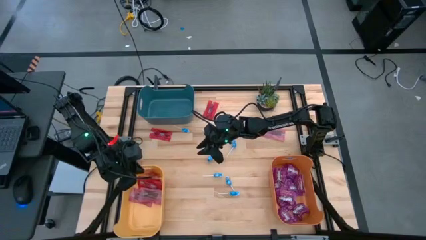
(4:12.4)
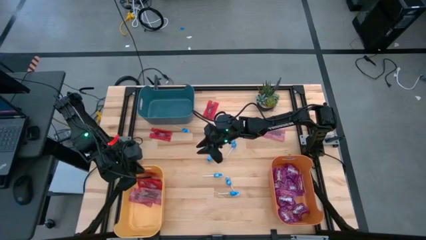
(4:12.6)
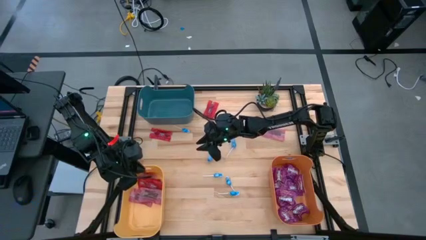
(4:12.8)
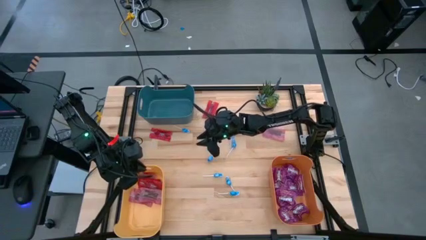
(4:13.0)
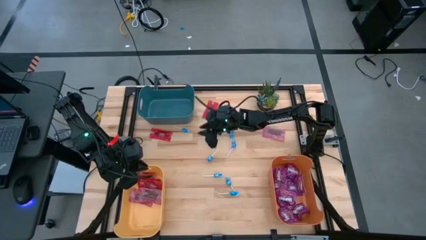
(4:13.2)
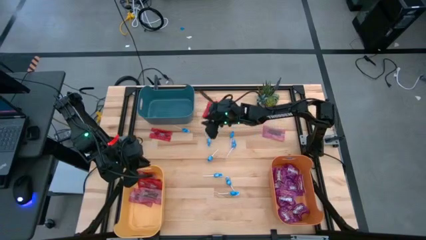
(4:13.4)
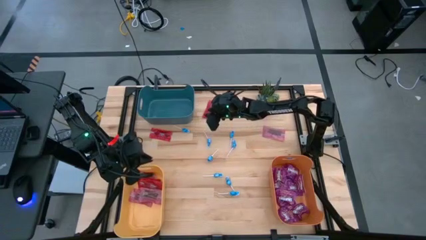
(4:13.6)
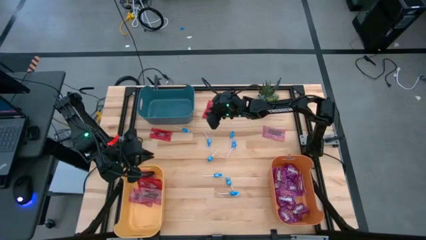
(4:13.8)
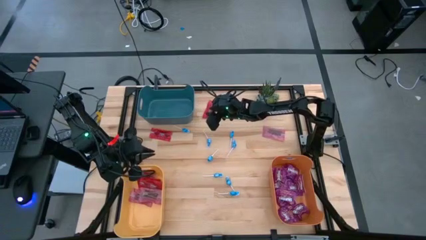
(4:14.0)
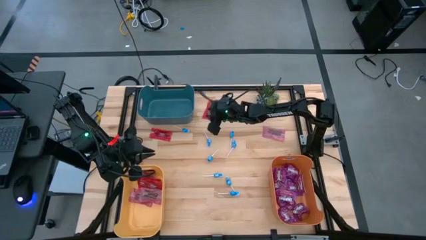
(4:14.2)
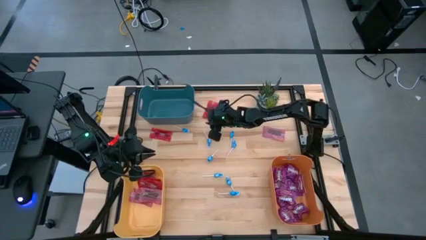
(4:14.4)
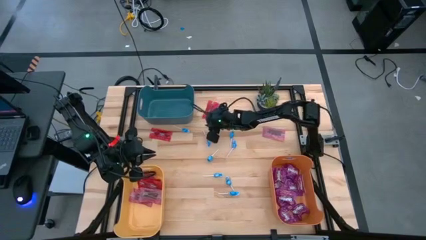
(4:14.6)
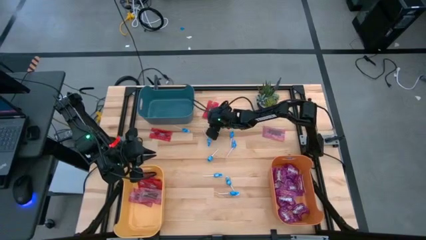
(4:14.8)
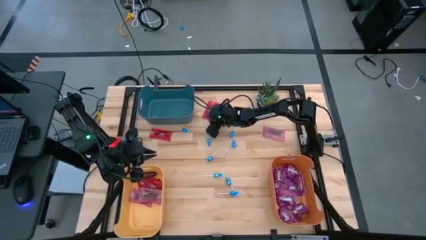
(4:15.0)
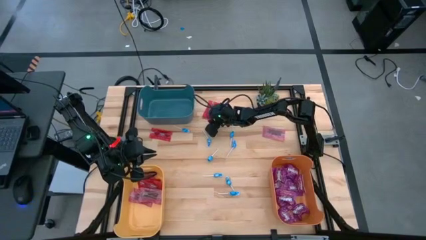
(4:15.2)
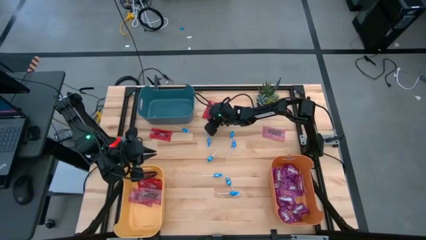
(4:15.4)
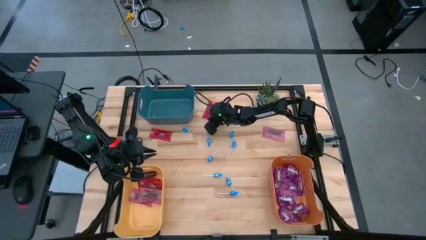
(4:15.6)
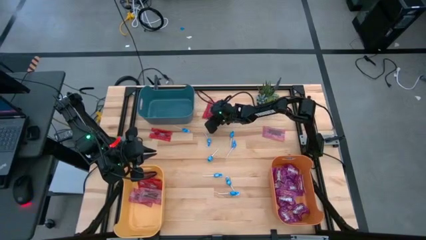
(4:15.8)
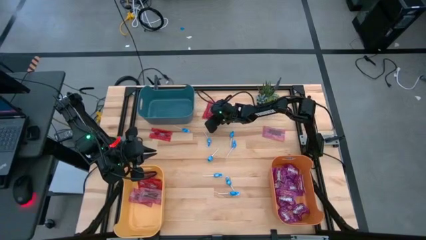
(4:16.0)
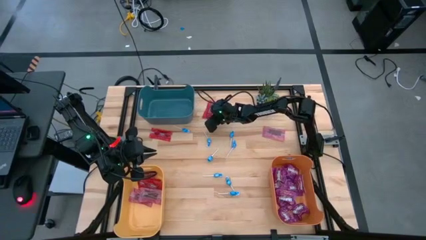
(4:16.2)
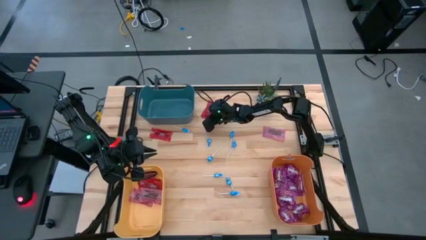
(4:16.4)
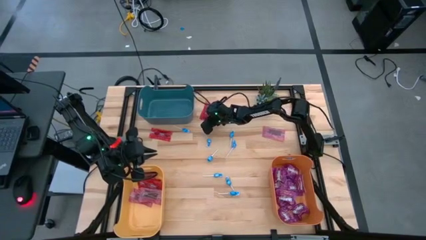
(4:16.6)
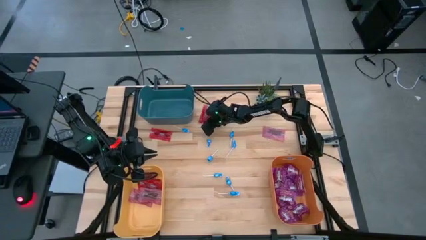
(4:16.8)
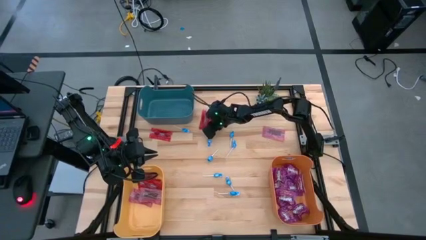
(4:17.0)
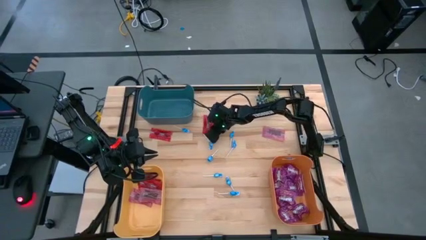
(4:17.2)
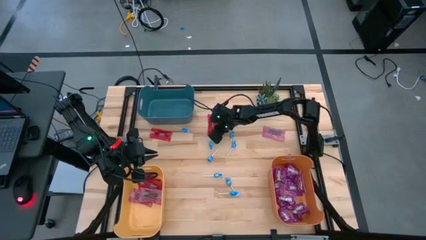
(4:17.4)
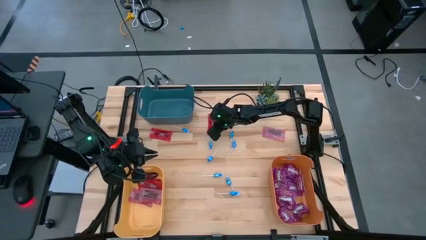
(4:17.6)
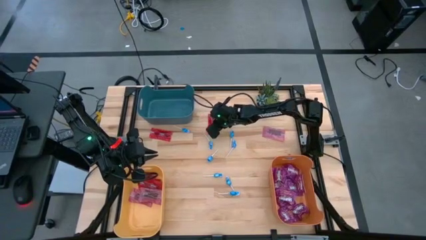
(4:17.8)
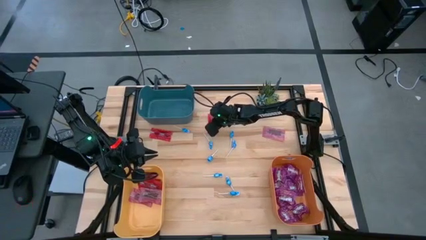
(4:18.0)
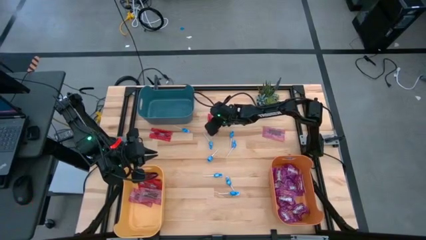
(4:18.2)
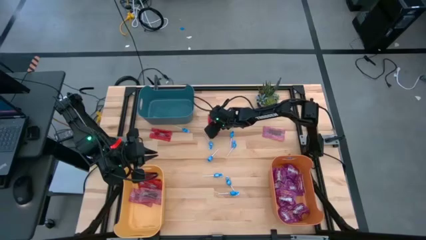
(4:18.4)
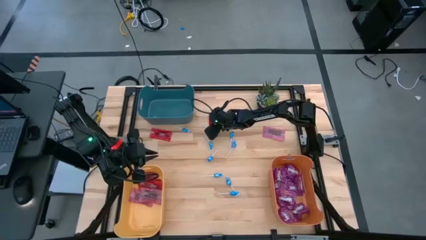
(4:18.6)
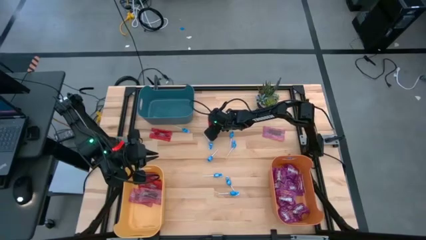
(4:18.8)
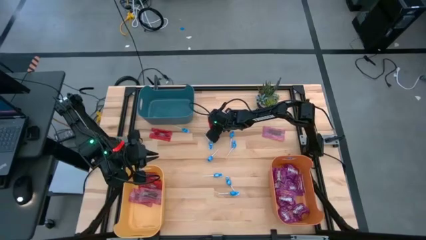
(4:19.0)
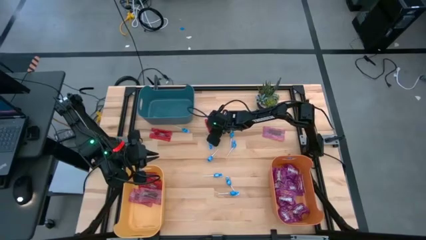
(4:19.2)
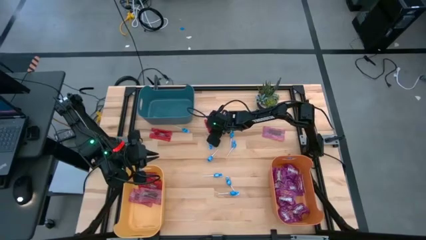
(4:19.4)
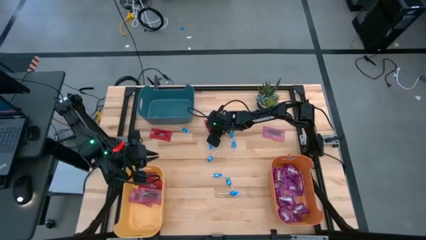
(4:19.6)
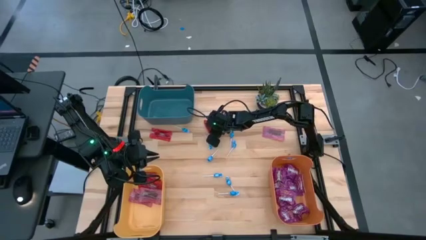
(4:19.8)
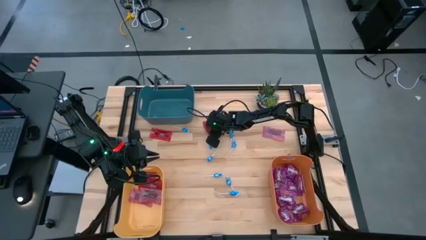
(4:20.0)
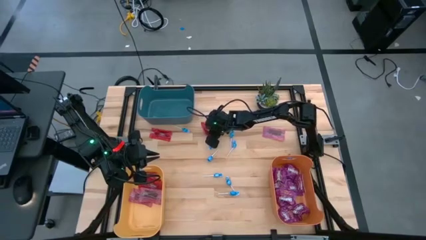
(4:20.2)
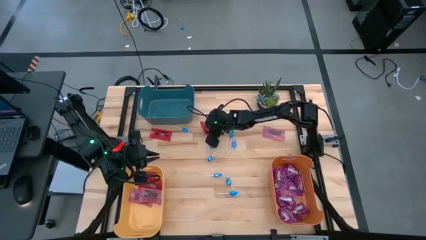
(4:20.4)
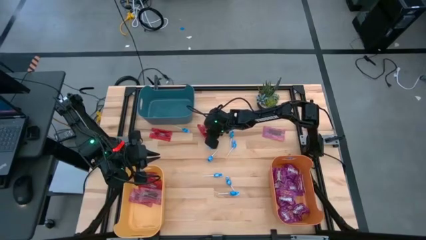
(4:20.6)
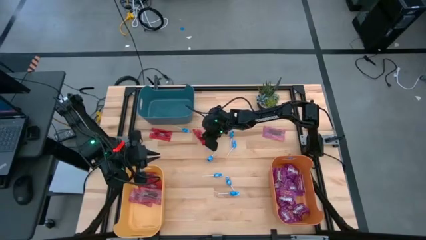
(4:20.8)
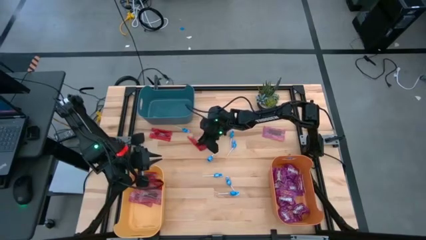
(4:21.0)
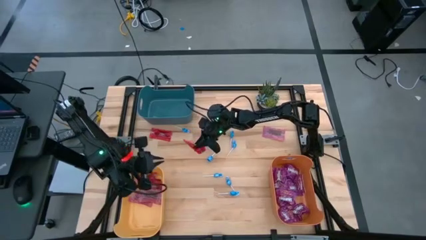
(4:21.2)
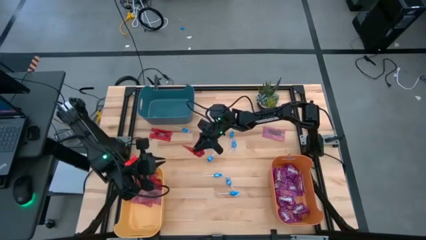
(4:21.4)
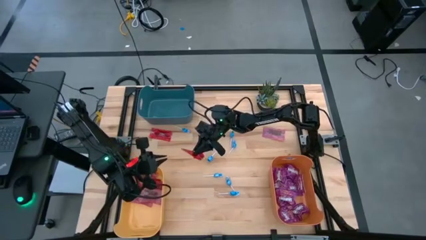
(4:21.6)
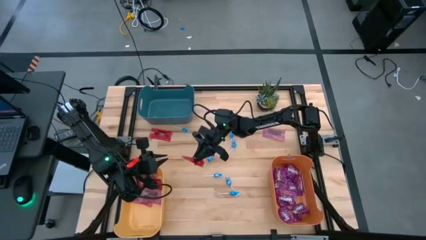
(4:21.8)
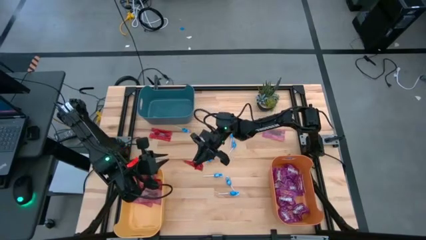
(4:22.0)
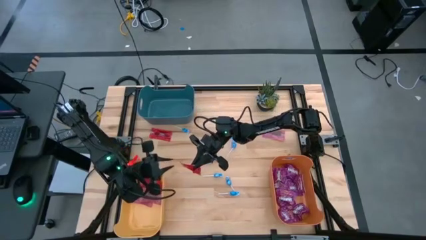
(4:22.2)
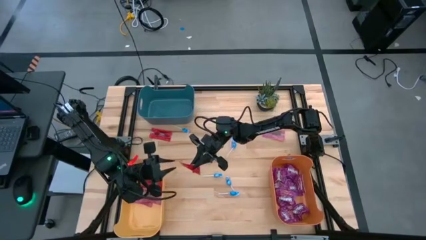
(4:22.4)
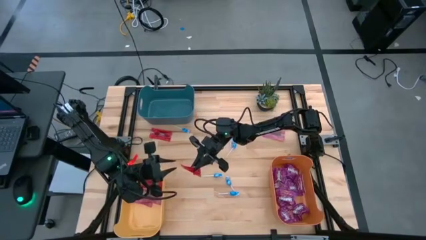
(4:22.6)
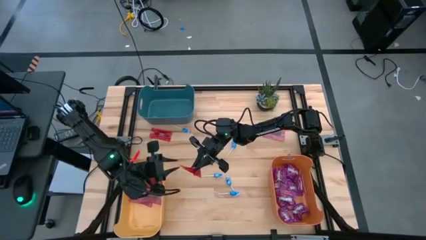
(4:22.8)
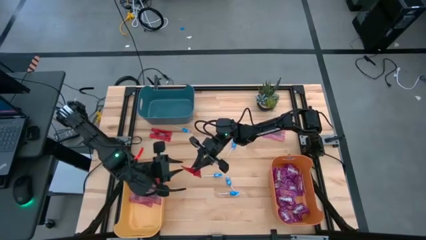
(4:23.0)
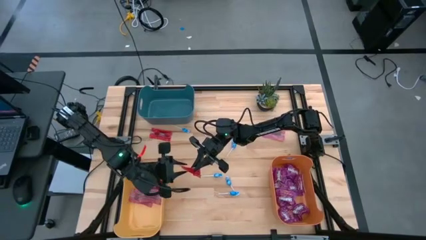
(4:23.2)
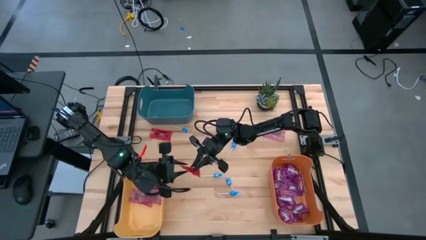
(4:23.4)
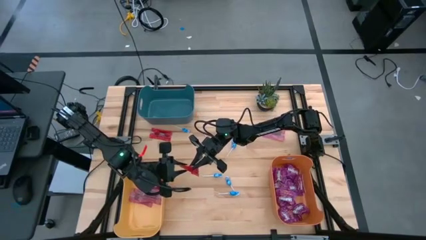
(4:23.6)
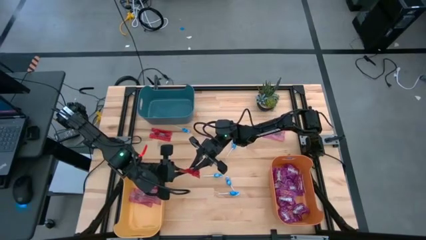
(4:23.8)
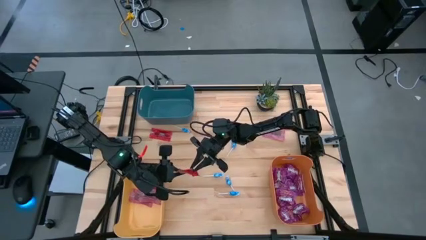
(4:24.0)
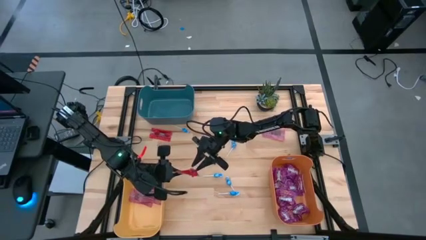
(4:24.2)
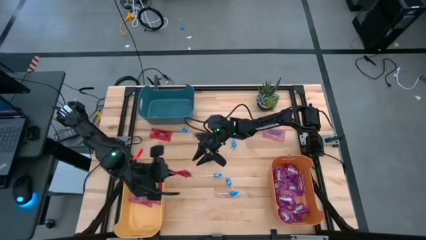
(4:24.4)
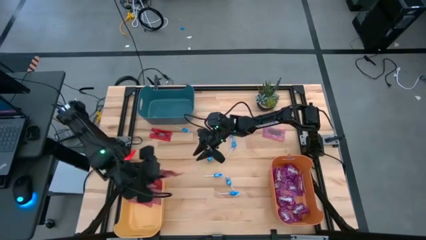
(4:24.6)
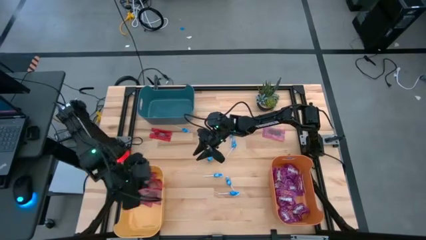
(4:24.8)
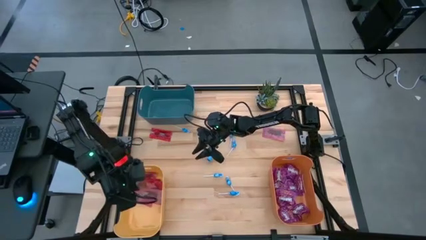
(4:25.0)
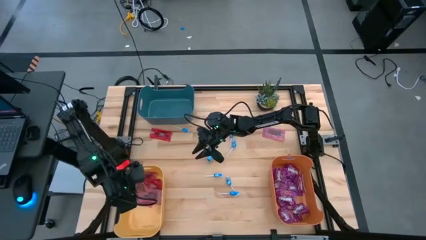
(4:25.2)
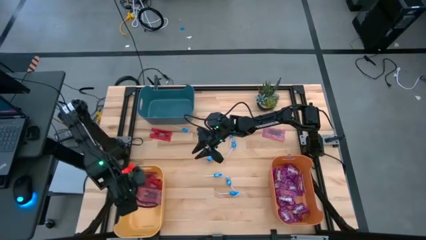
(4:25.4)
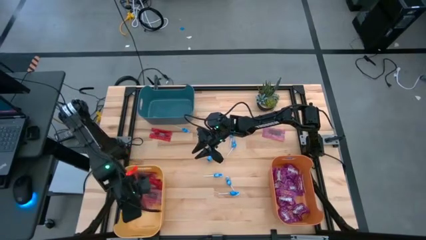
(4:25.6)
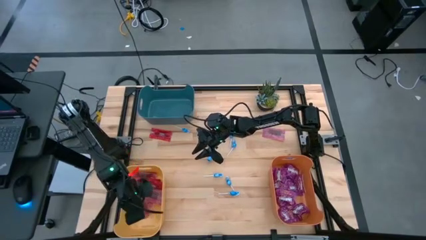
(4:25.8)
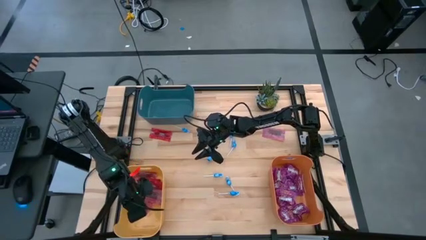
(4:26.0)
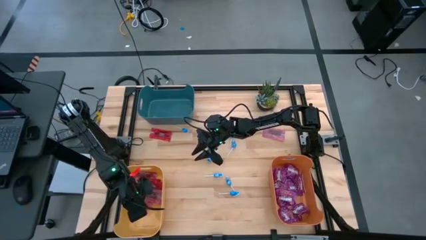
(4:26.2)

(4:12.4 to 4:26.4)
Task: Sort candy
Put the red candy into the yellow bin

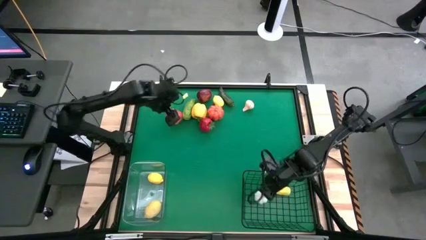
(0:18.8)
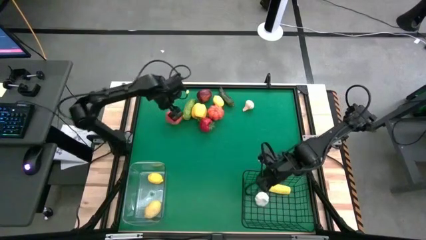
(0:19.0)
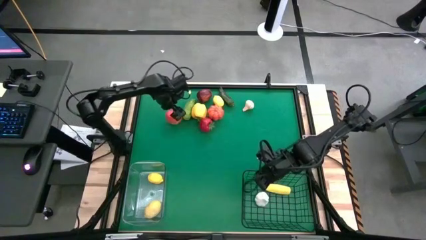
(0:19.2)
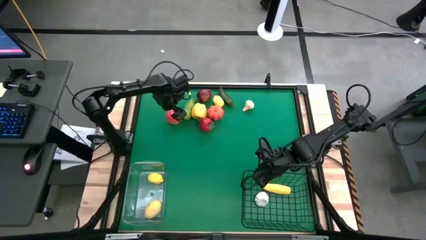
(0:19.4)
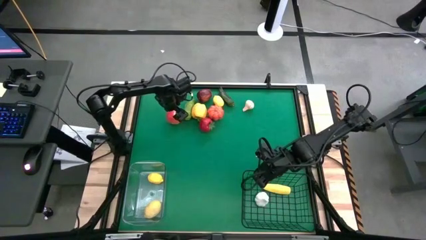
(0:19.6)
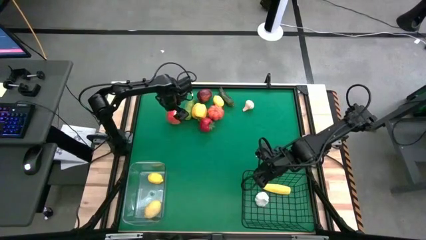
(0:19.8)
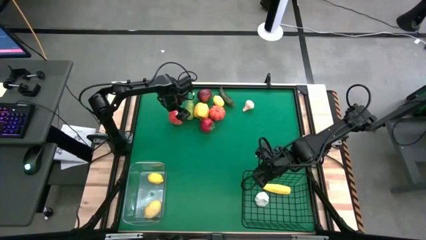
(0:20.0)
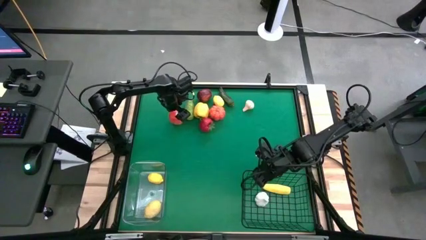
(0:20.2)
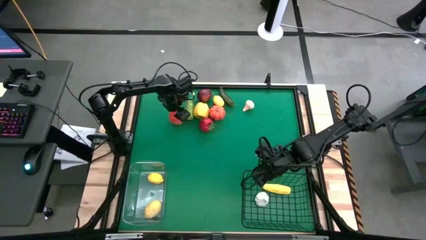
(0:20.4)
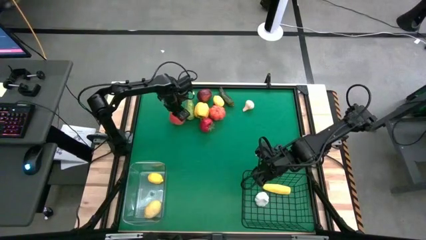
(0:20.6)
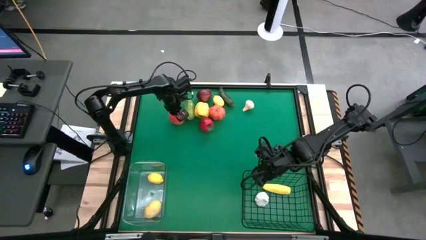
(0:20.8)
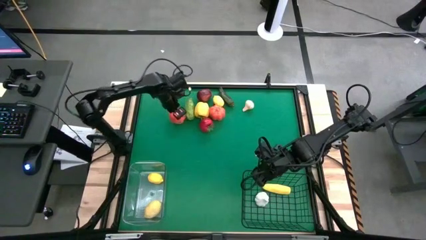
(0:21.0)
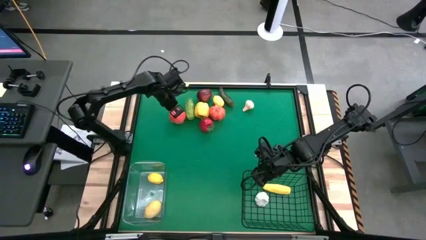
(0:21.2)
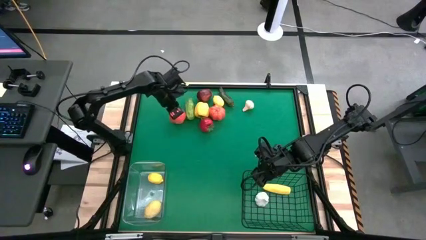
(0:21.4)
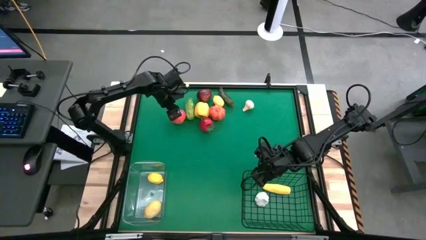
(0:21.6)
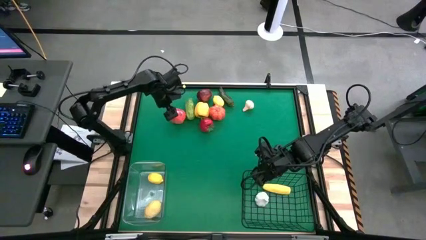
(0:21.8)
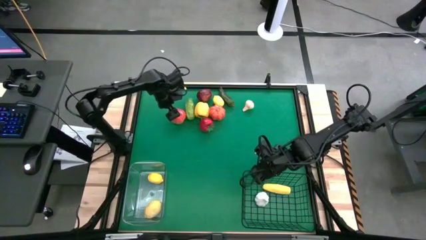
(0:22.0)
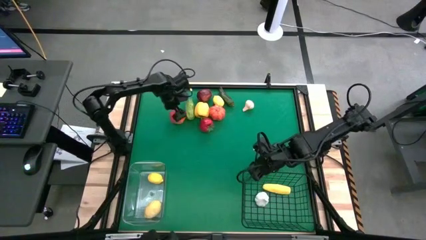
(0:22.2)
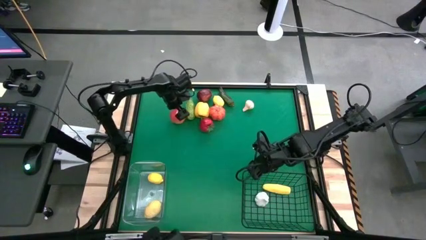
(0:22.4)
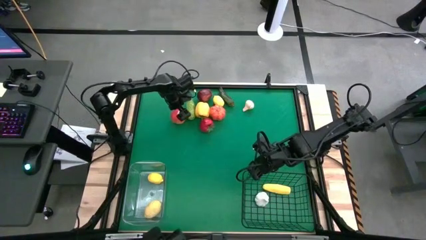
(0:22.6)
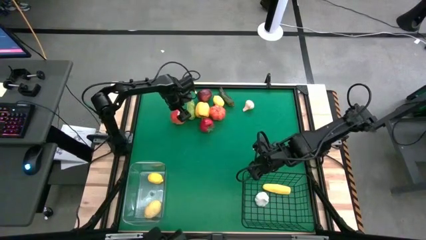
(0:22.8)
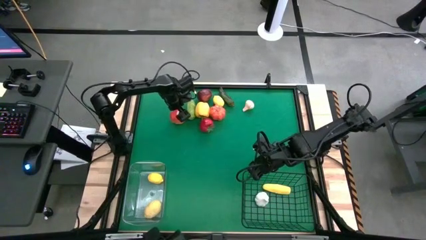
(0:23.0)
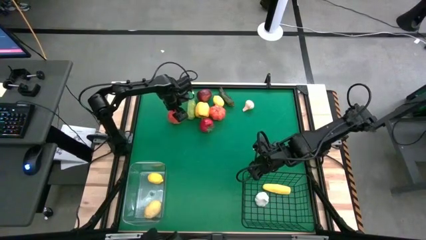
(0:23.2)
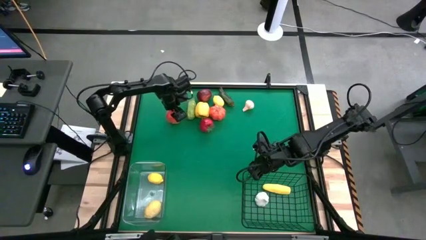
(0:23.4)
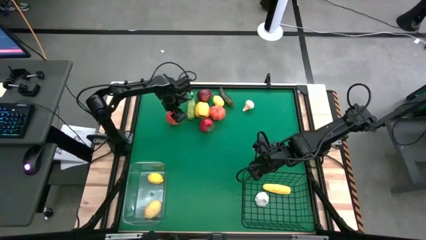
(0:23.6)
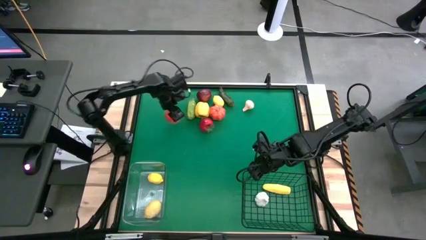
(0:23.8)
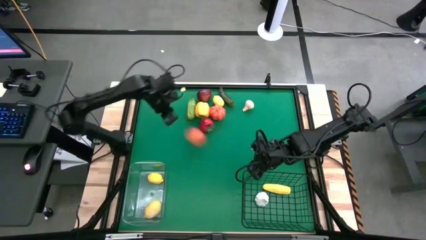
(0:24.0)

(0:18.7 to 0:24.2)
Task: Sort produce into baskets
Put the bottom apple into the transparent bin
